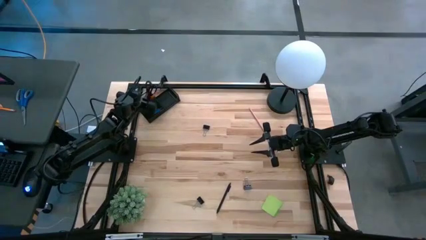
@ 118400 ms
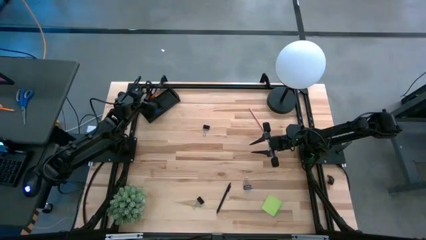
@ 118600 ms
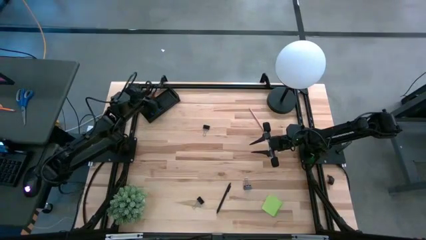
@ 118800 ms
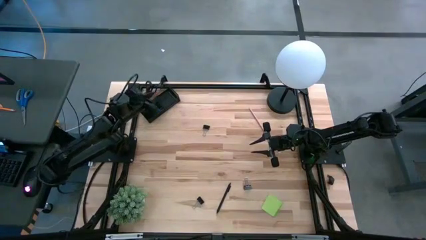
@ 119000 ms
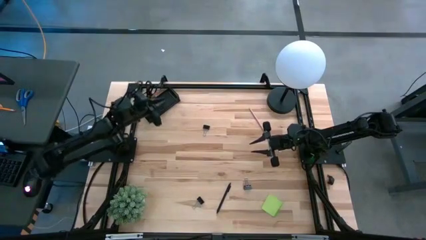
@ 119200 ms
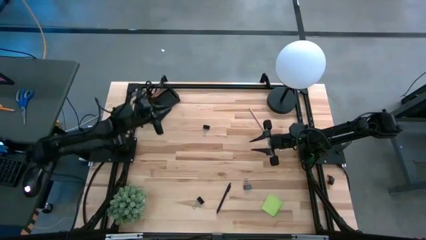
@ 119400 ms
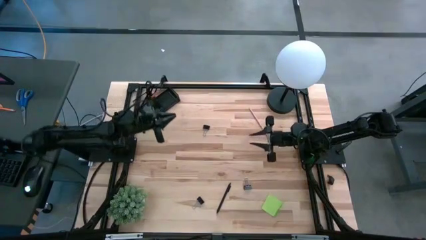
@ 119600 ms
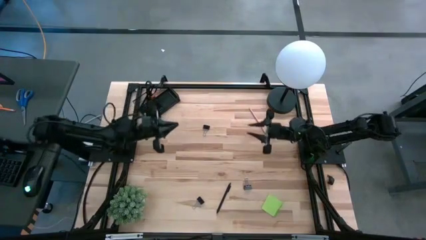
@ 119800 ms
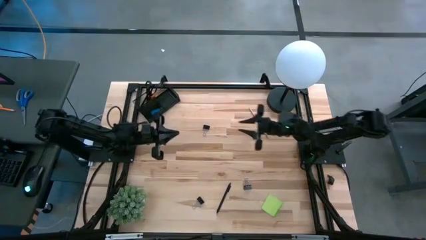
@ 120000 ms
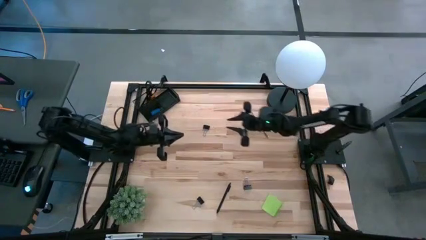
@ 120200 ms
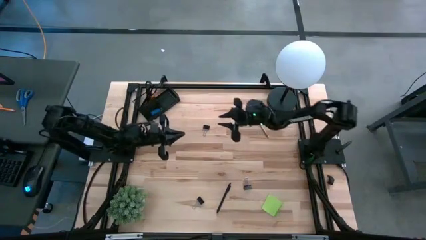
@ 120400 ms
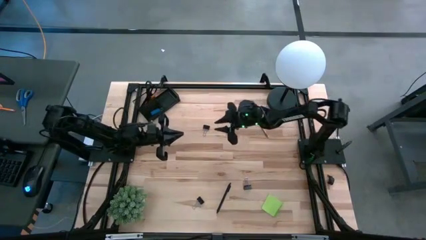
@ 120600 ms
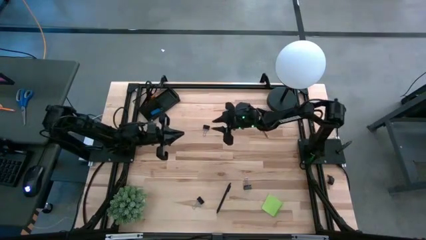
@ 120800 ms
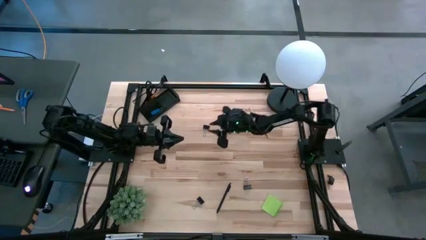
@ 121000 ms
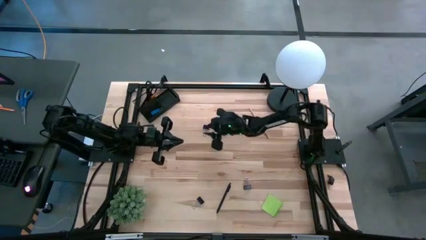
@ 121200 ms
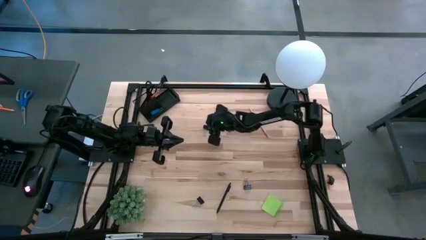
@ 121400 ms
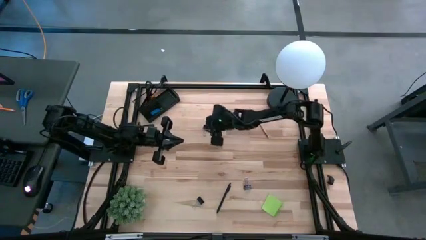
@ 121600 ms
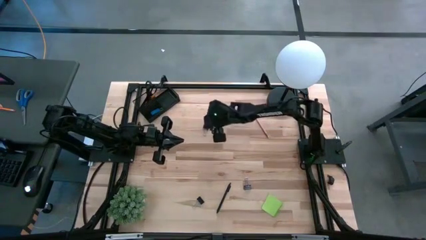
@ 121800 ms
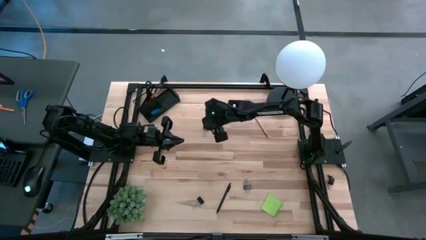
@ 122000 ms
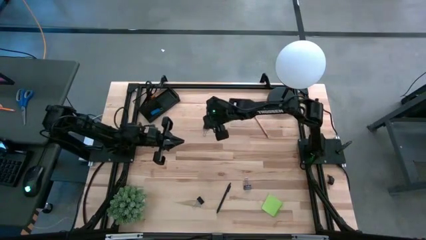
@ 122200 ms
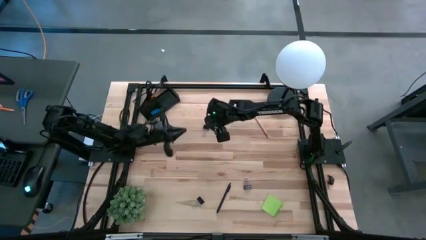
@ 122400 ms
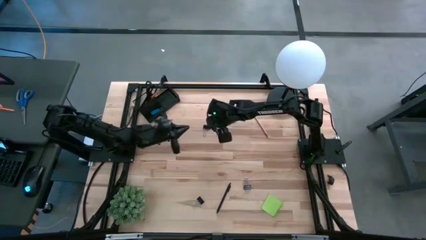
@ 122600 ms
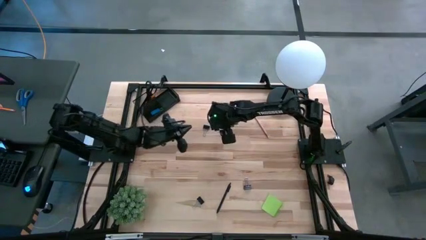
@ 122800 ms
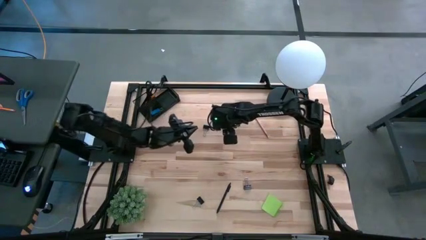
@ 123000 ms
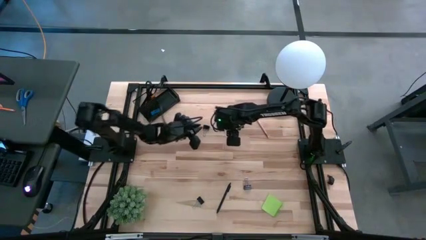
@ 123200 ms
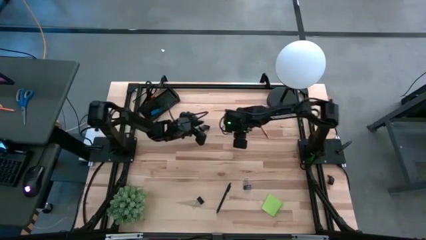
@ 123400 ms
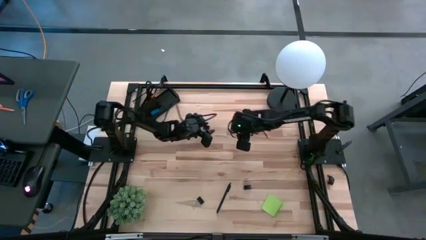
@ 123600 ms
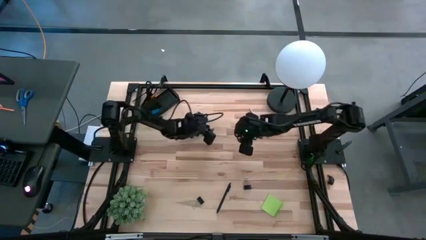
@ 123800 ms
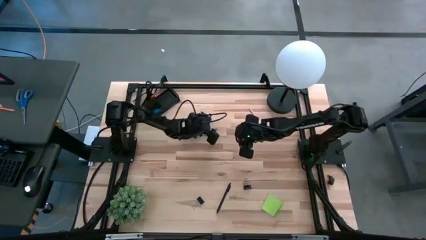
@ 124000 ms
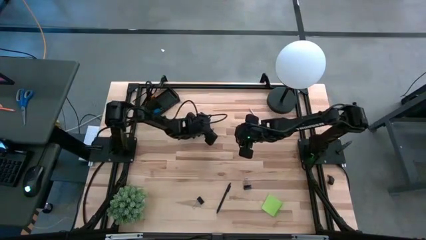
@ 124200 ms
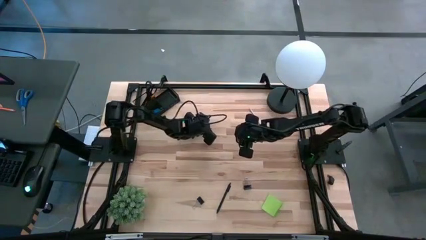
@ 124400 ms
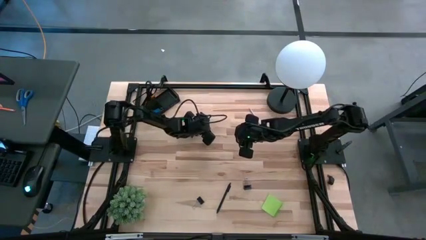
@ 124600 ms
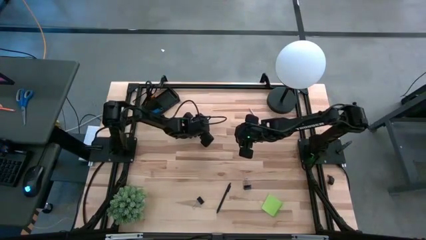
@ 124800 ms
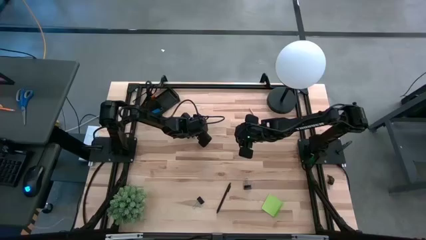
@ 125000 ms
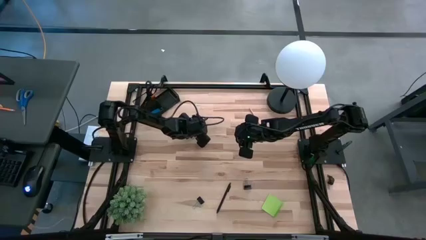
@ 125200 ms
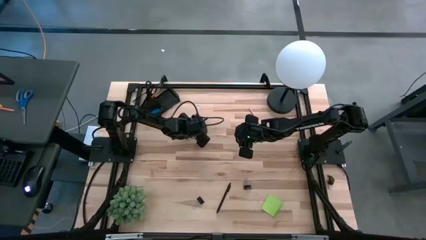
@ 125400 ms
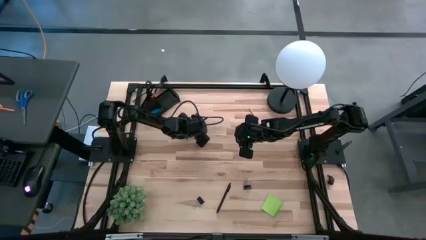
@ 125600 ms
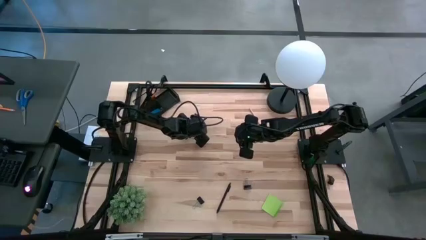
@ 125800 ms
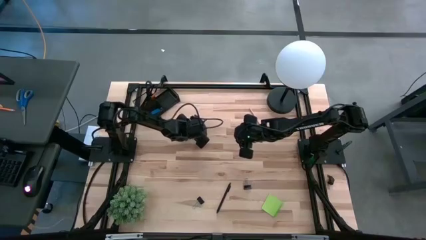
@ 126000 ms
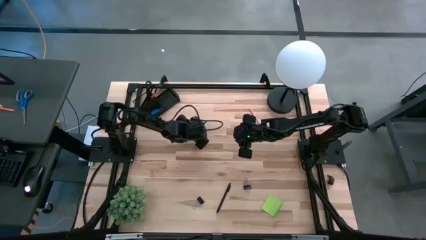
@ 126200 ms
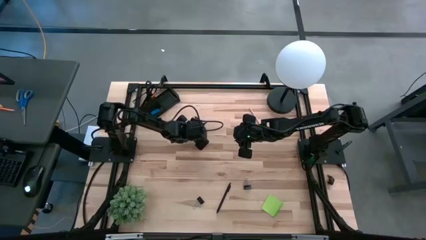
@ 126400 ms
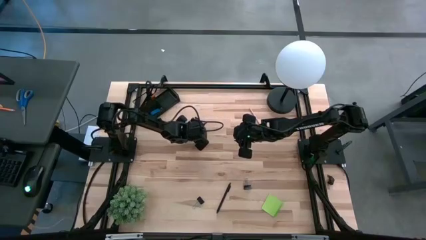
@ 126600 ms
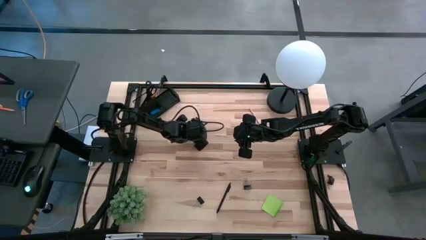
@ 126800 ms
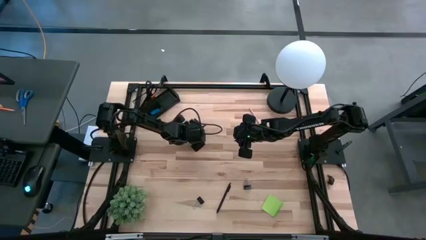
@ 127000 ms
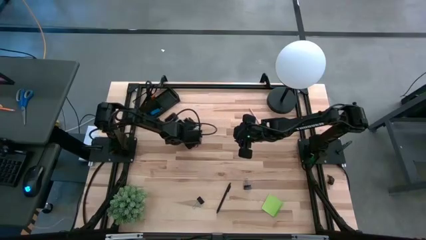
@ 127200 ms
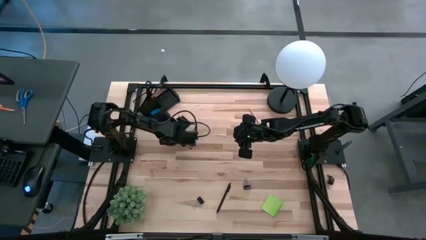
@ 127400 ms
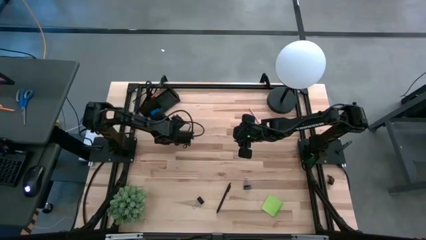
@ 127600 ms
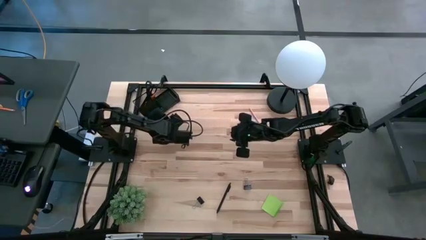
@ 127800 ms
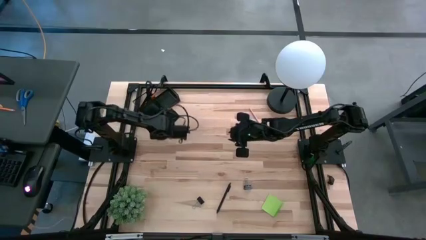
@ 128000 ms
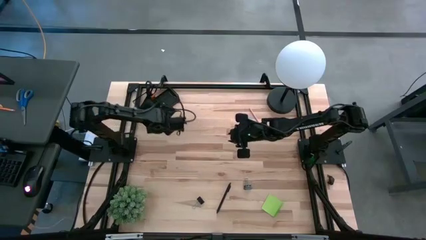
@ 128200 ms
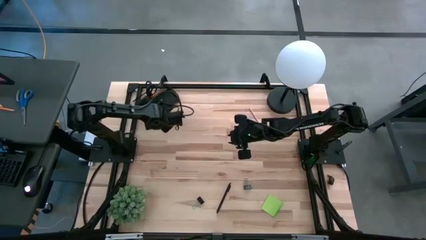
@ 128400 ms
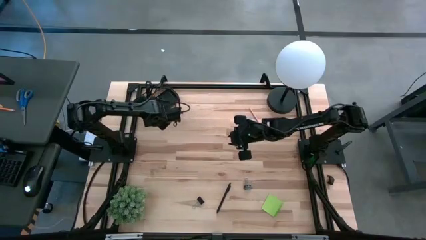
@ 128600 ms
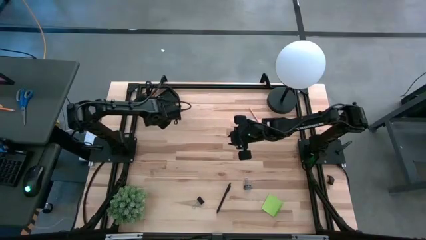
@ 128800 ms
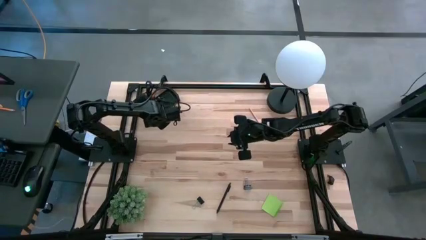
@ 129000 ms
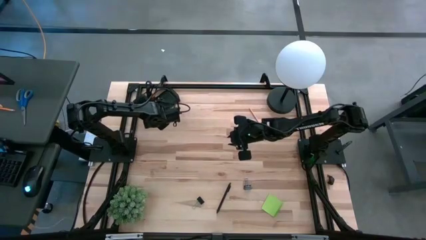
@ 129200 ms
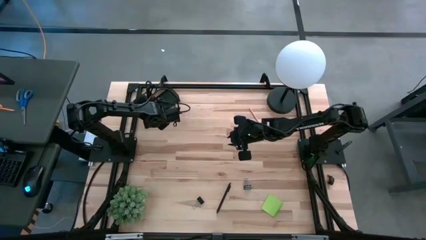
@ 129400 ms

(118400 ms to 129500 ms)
Task: Pick and place office supplies into organizer
Put the black binder clip into the black desk organizer

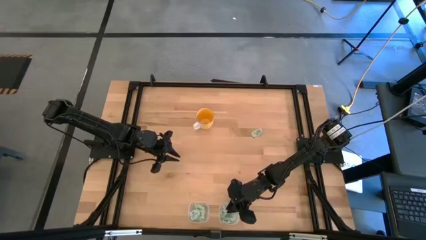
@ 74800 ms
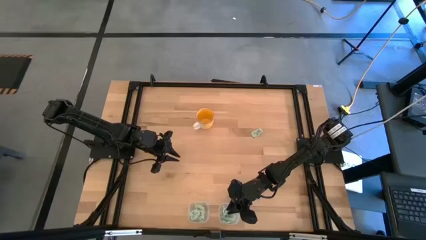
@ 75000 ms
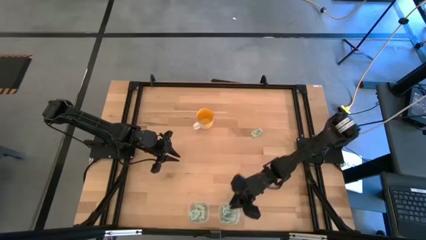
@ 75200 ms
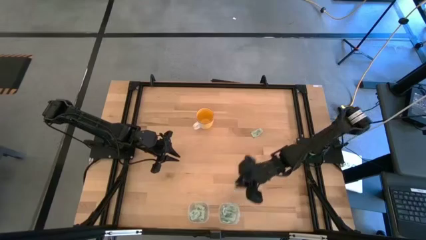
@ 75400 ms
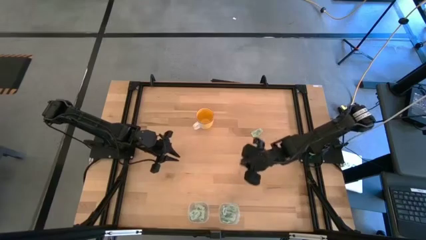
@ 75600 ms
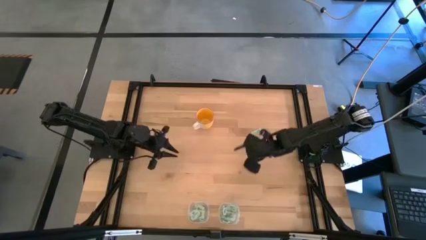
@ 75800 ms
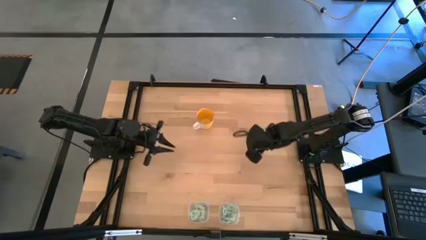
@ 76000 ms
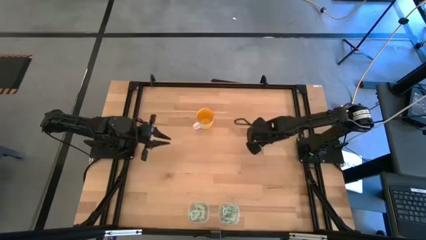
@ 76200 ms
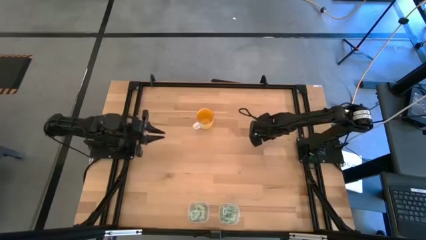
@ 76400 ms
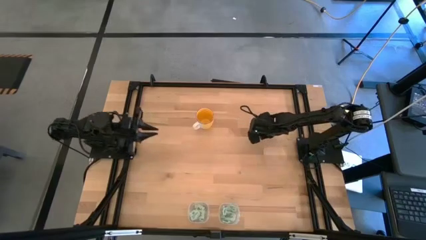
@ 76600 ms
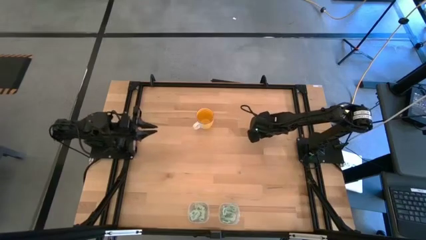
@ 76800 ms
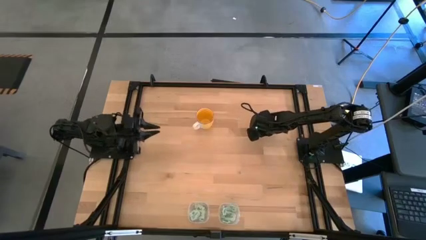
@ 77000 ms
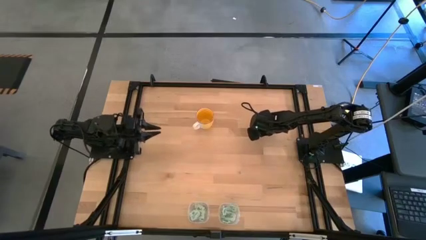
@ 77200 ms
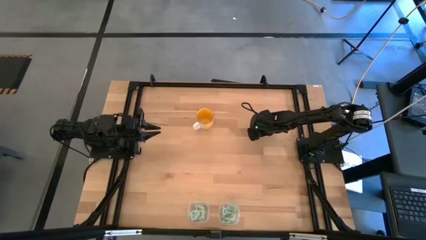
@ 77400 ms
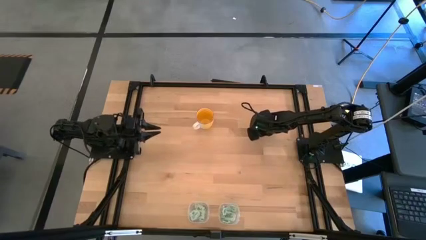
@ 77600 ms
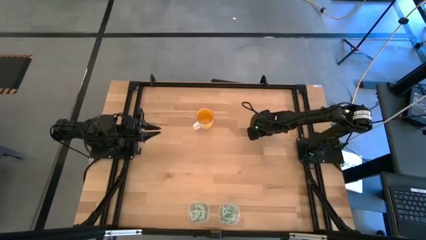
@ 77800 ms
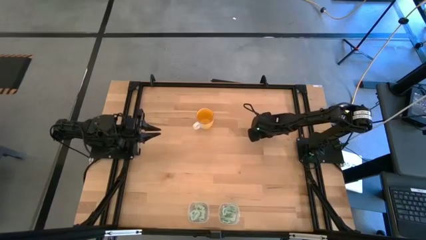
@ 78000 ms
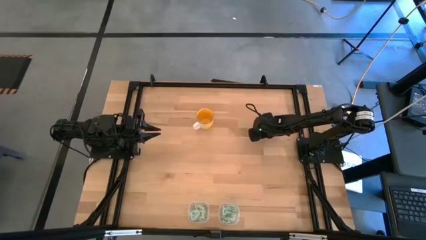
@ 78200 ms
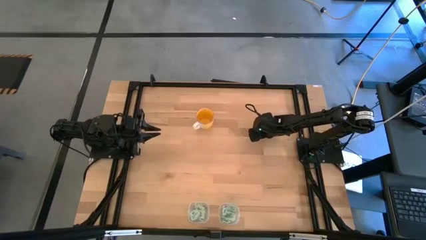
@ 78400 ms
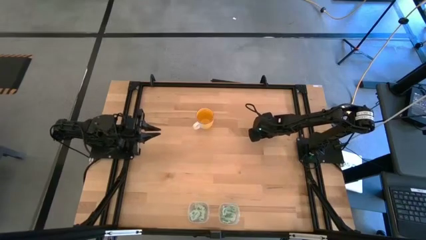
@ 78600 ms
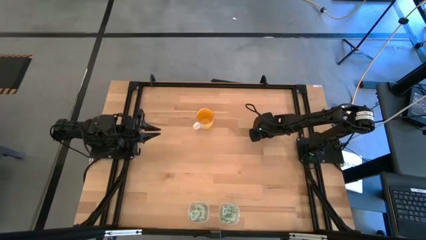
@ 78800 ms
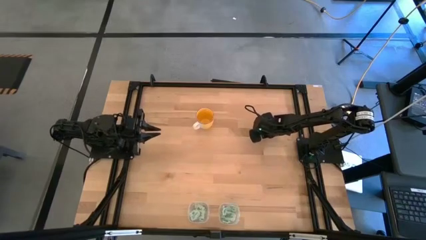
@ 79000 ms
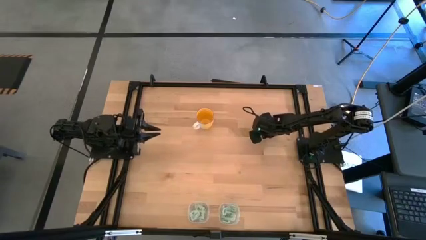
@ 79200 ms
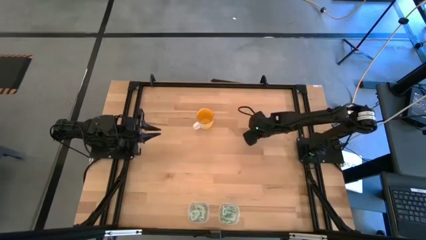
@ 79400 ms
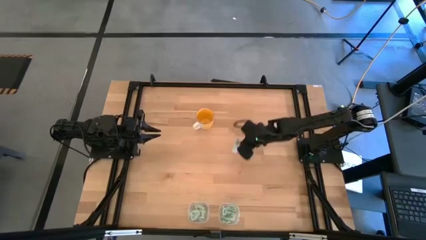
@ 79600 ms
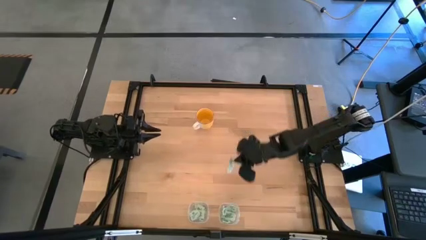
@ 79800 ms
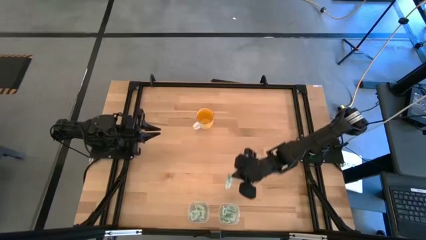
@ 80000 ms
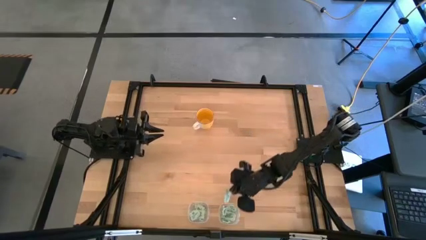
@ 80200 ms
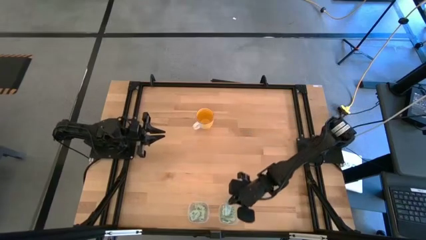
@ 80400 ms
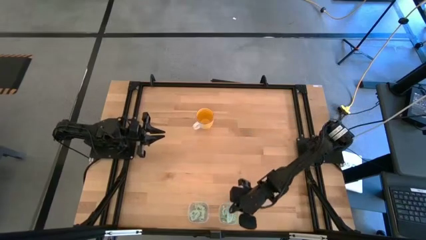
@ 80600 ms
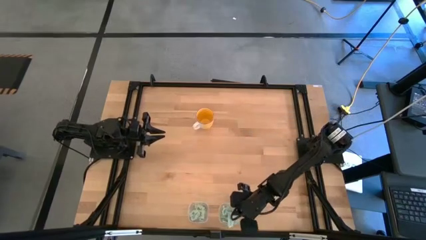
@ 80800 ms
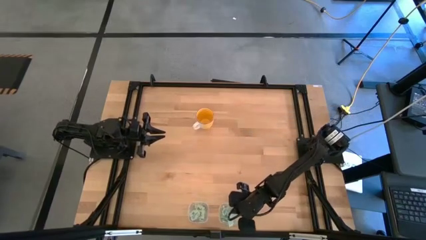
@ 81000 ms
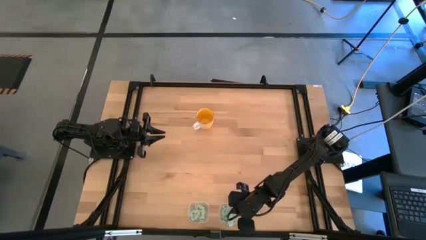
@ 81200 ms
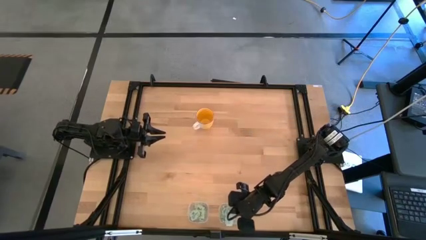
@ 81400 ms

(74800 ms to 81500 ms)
Task: Pick and place items into bin
Put the green stevia packet into the right transparent bin
